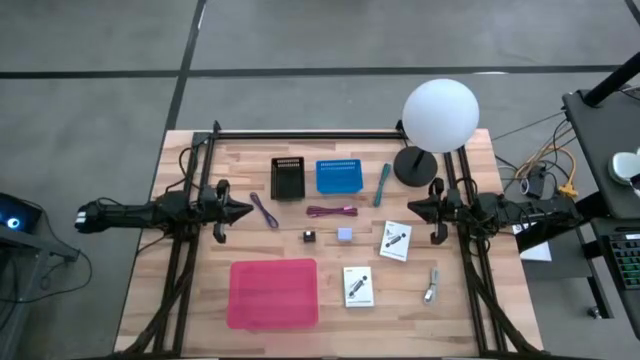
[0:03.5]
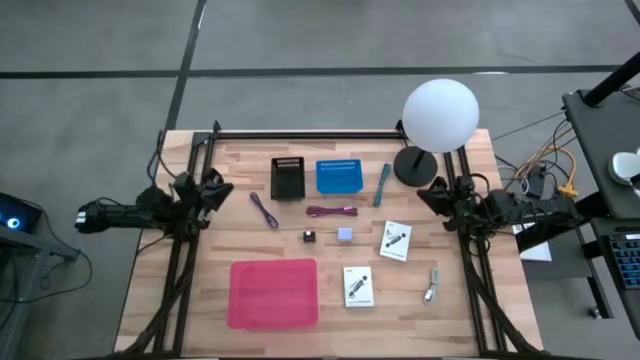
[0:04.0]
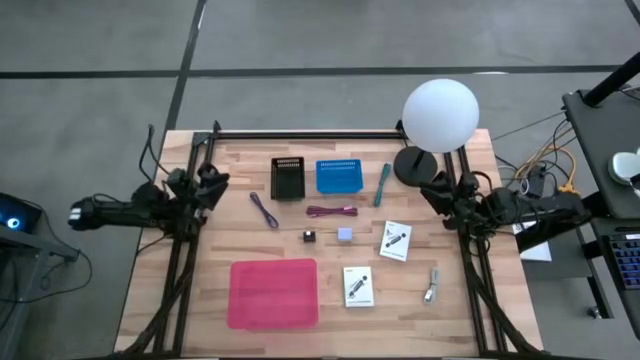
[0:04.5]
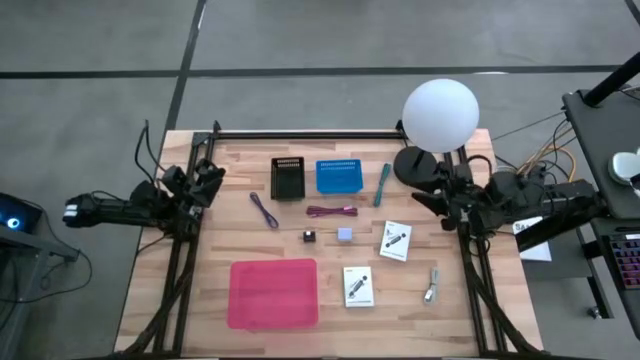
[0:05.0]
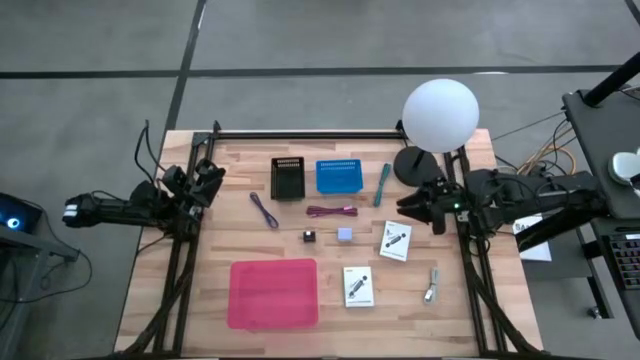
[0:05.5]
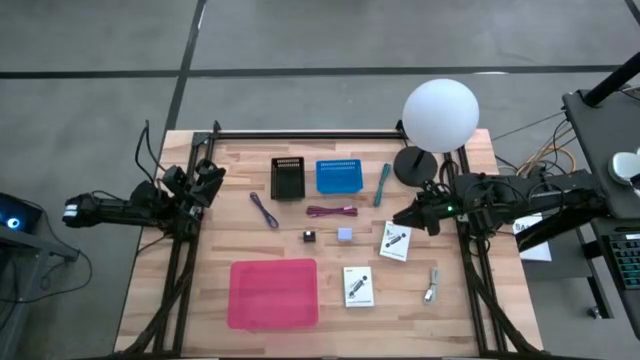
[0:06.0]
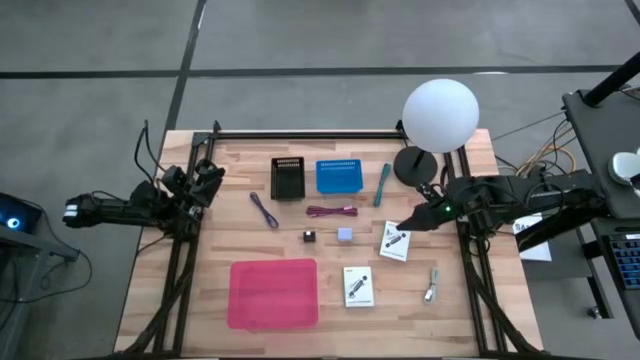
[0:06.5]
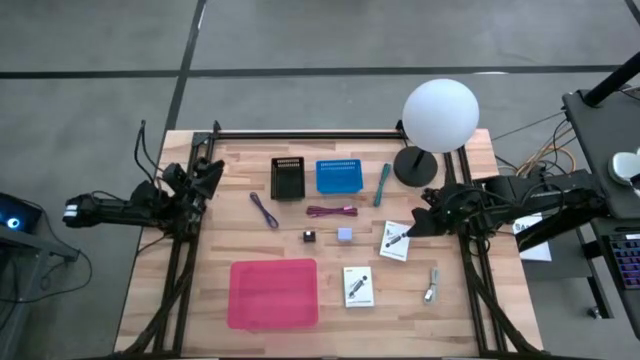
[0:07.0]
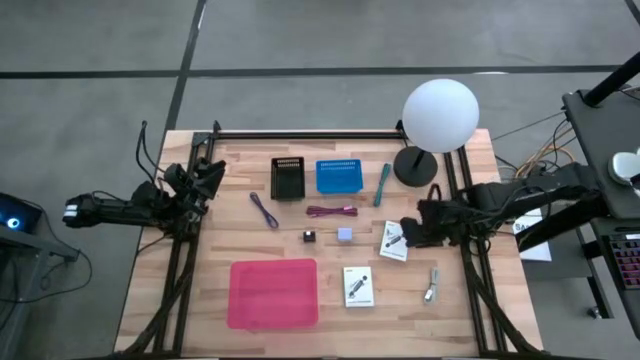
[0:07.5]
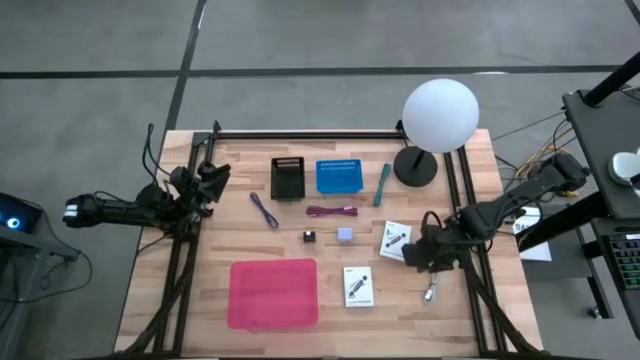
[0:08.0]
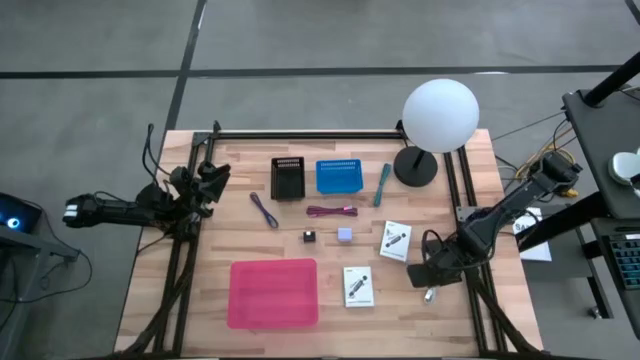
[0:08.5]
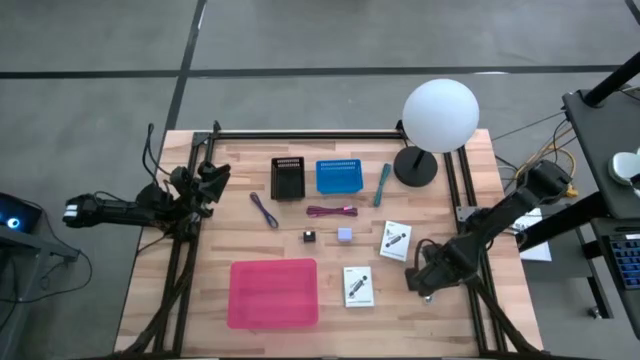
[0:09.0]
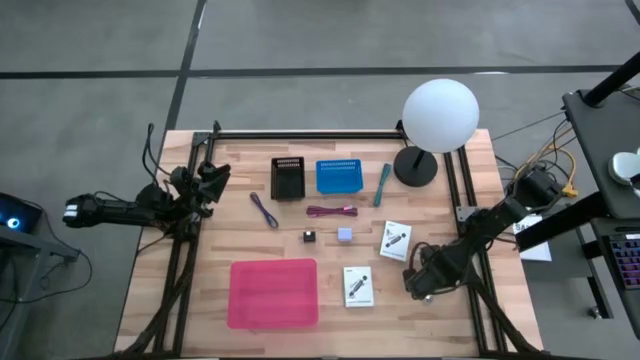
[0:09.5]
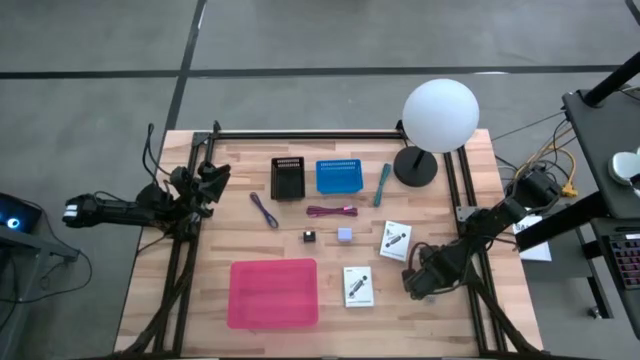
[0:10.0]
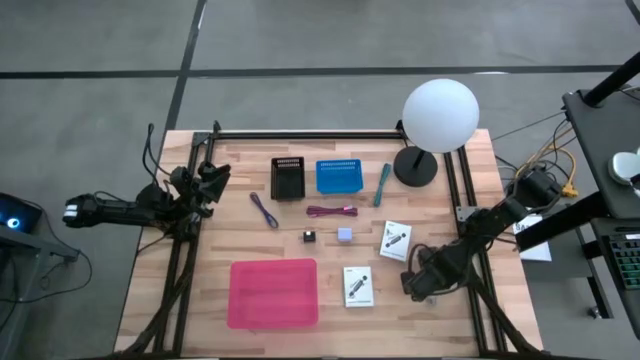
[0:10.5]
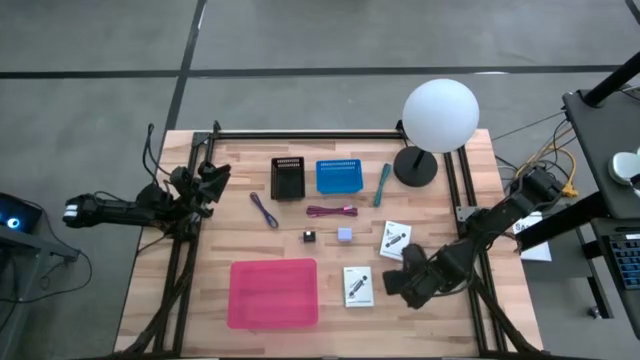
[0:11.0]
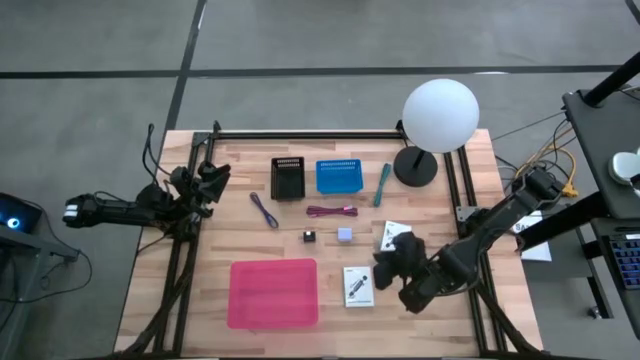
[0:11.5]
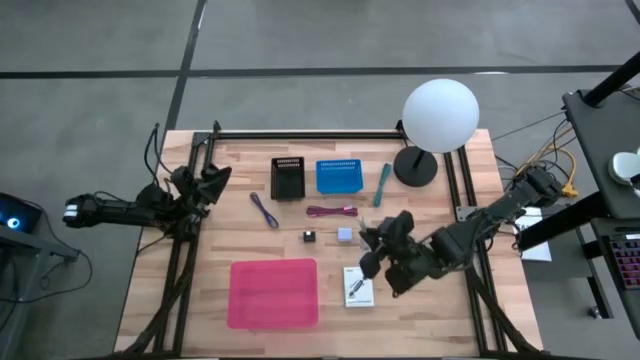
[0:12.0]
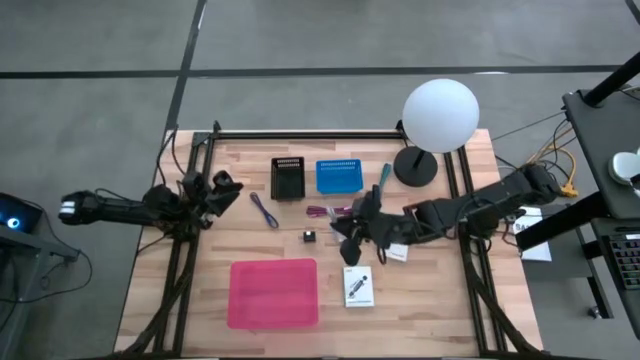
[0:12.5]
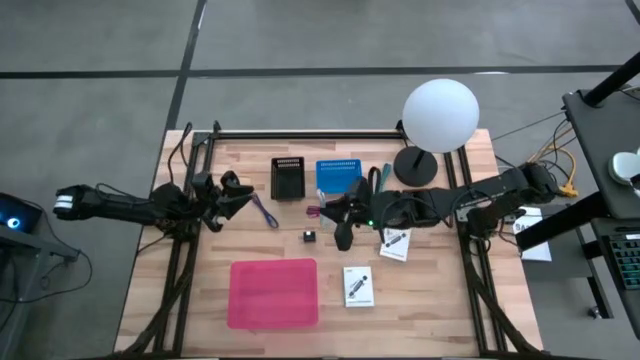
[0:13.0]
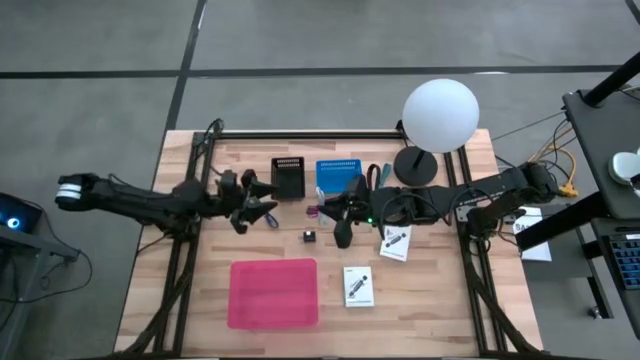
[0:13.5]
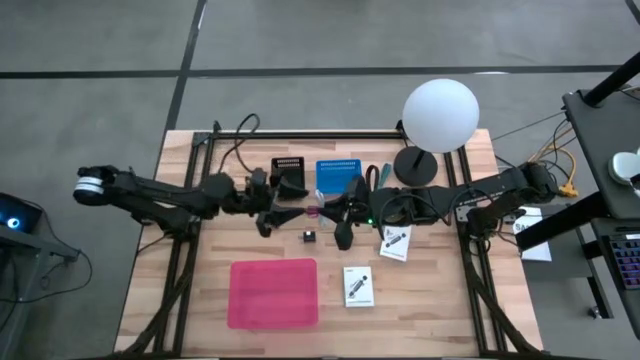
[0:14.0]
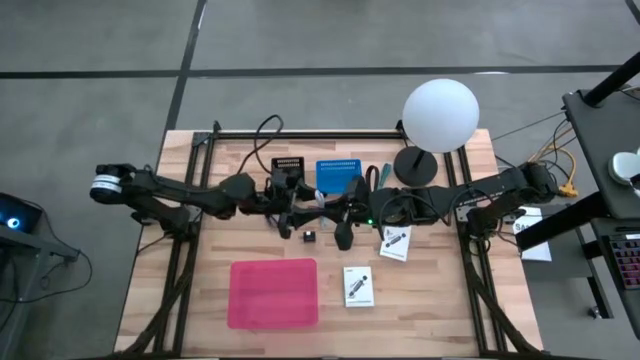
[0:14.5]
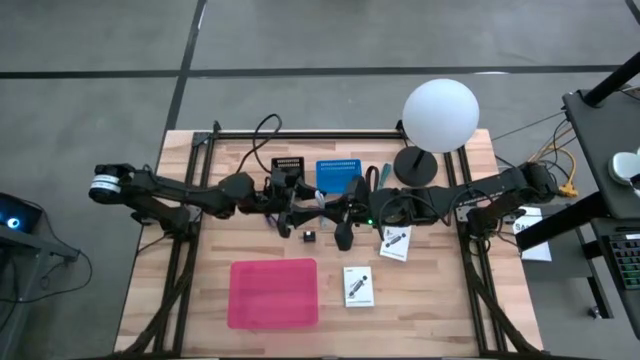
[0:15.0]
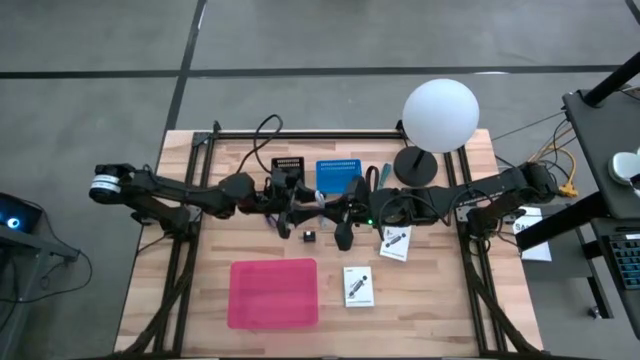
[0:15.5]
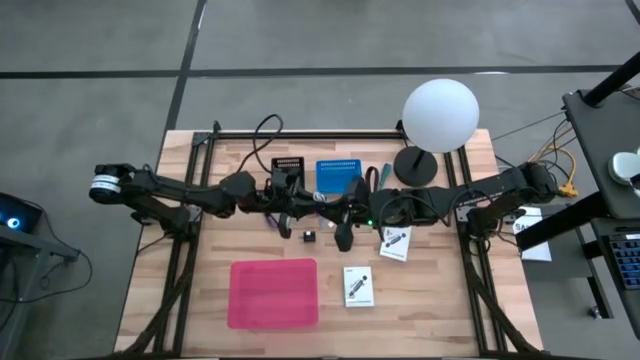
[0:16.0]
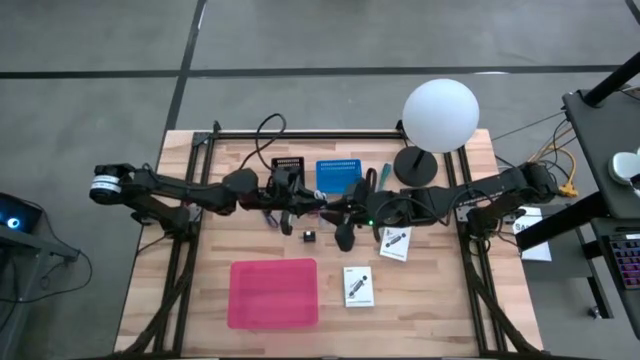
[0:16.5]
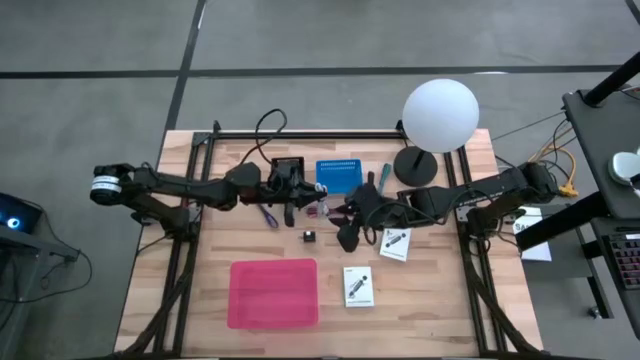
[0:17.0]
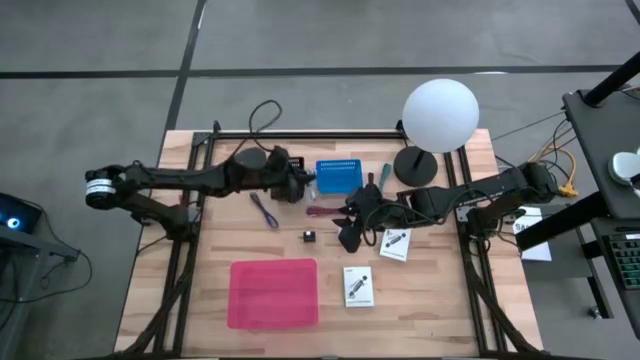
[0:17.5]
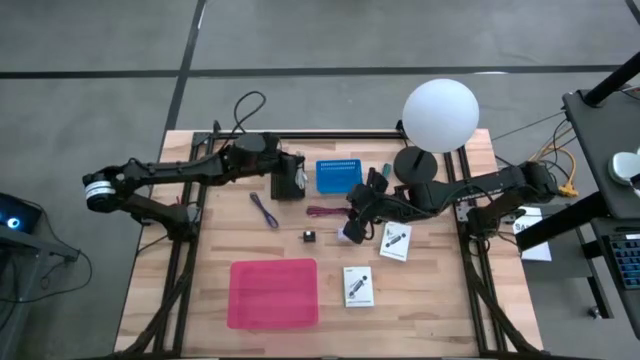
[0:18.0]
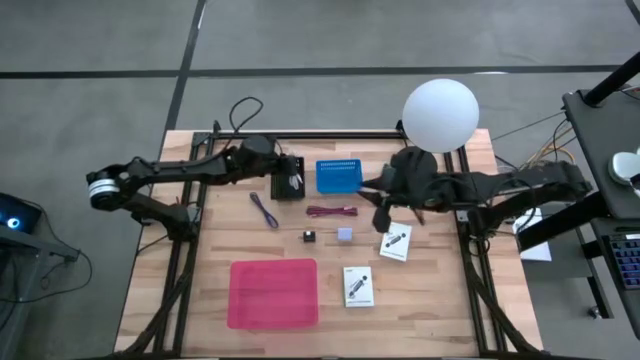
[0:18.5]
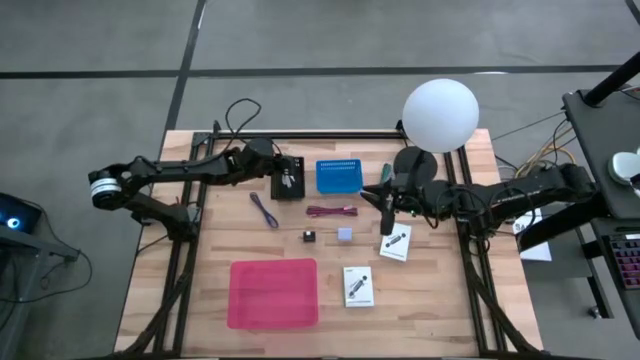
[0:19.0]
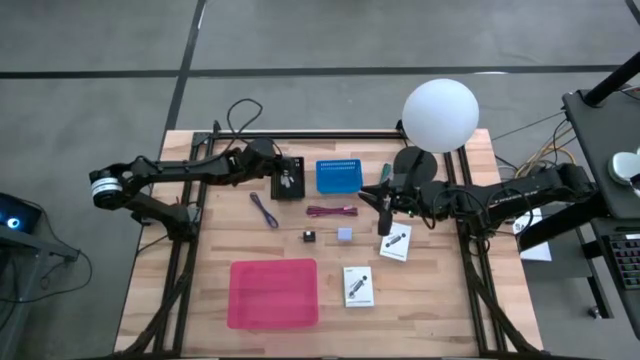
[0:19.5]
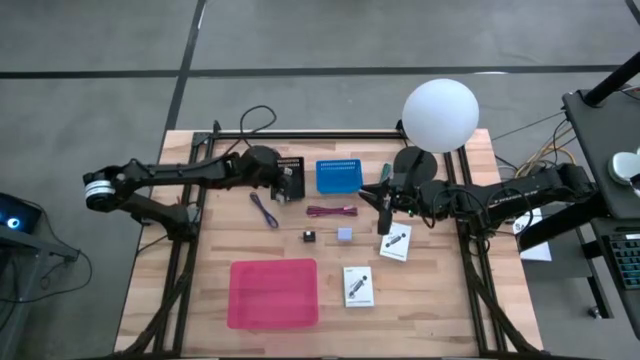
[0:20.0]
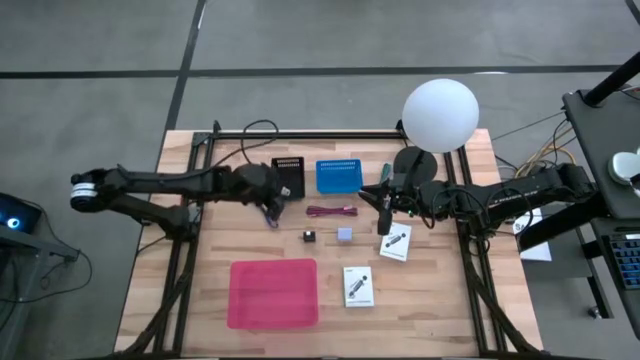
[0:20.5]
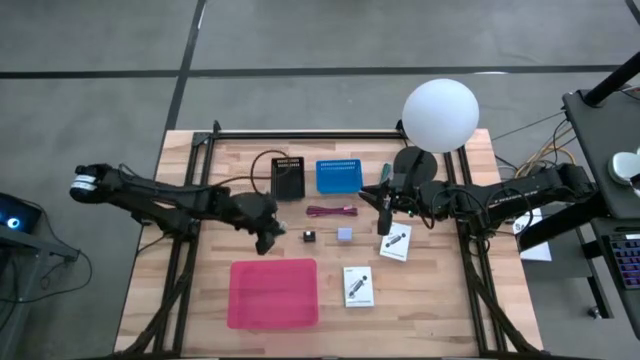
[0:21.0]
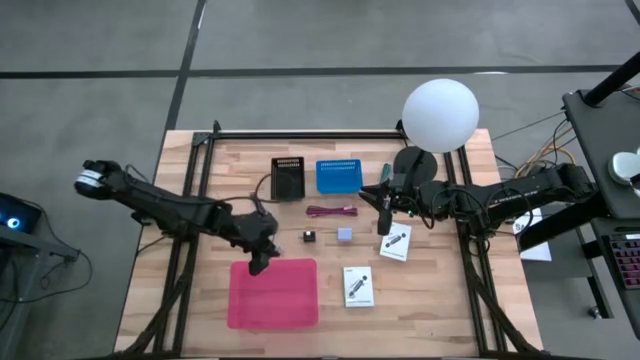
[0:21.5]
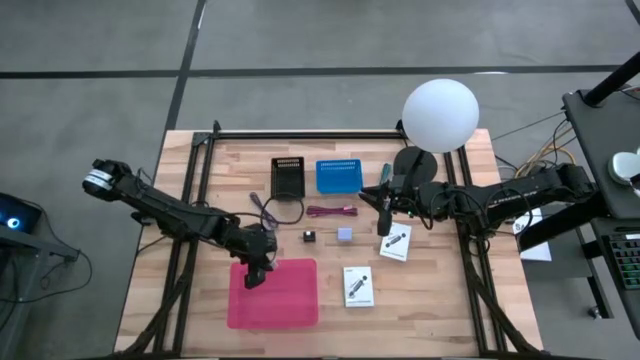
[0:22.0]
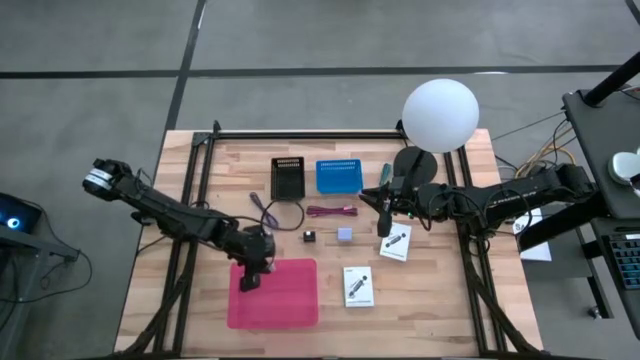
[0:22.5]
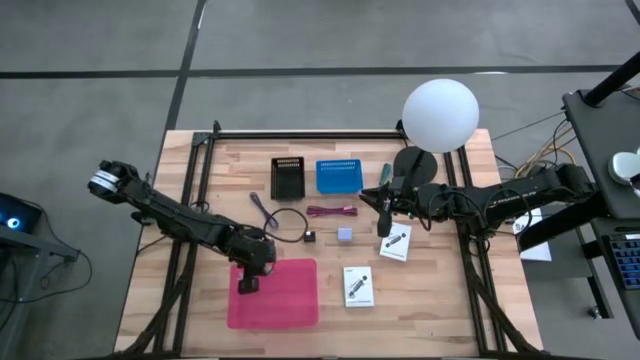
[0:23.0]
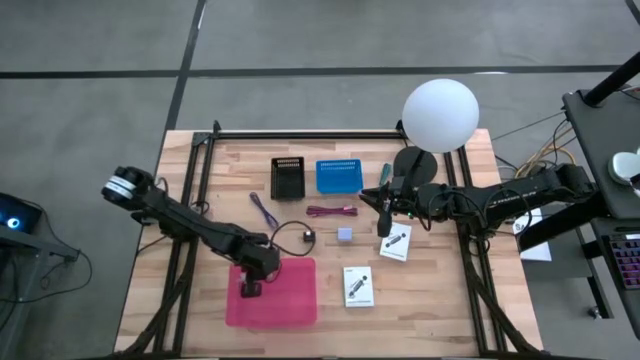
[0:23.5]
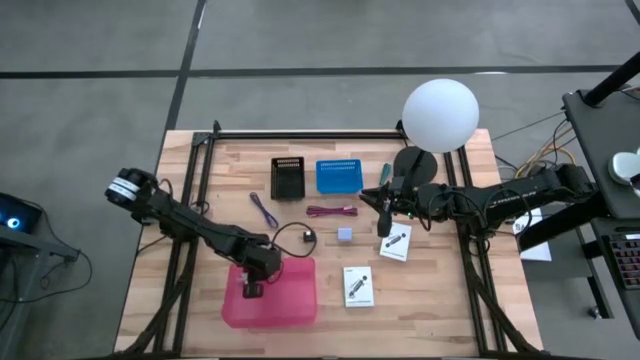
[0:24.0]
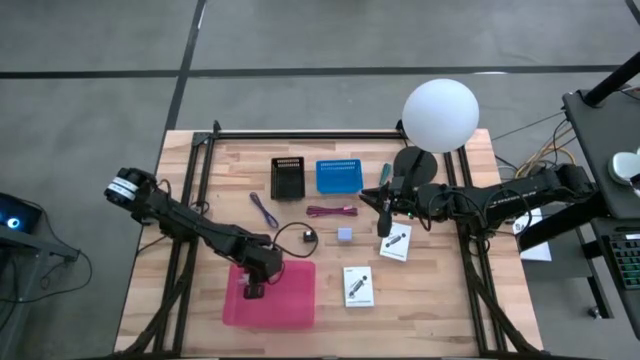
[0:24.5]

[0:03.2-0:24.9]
Task: Pick and place items into bin
Put the white charger cable into the pink bin
